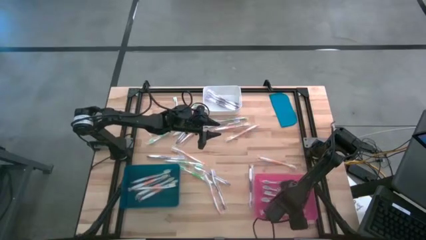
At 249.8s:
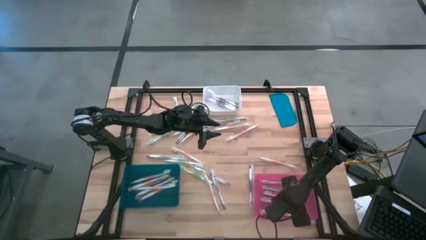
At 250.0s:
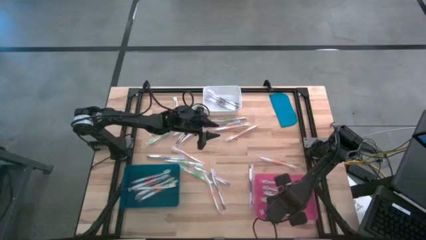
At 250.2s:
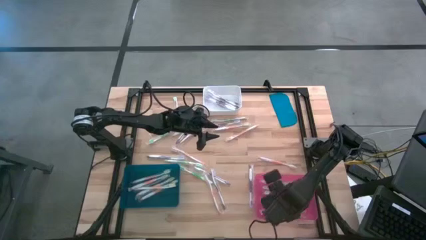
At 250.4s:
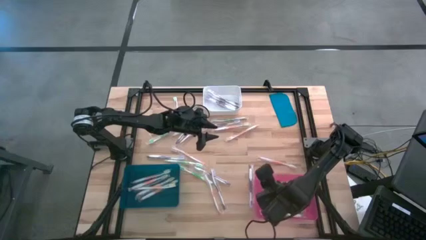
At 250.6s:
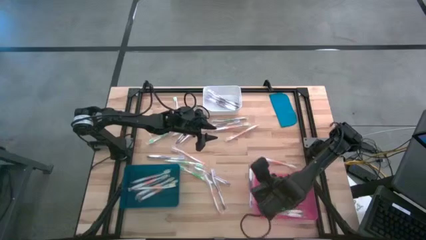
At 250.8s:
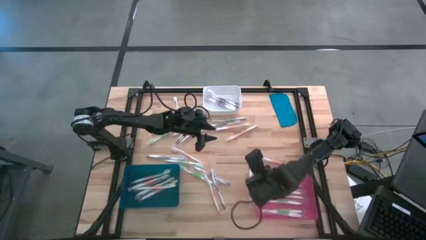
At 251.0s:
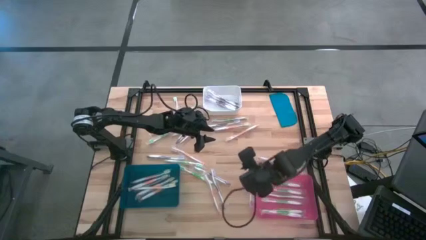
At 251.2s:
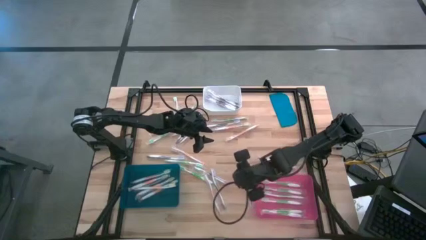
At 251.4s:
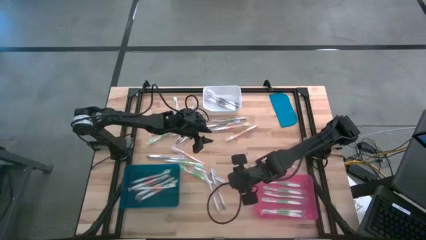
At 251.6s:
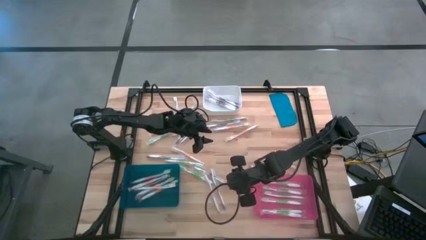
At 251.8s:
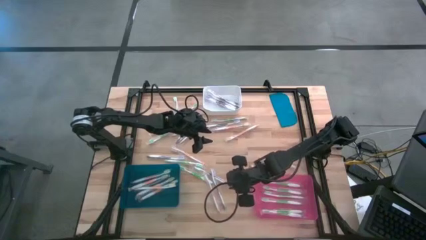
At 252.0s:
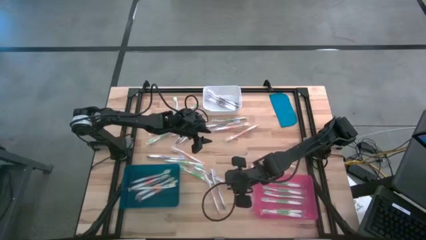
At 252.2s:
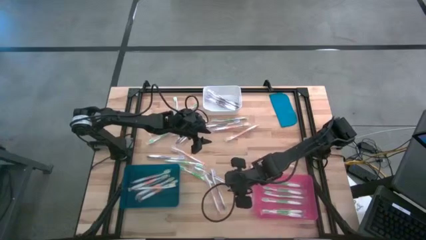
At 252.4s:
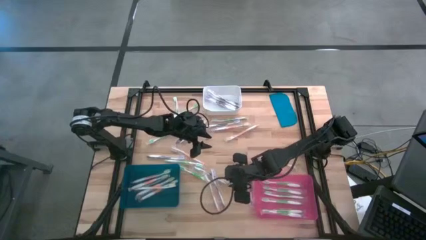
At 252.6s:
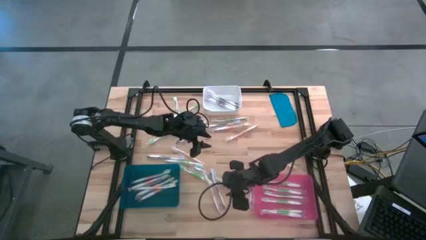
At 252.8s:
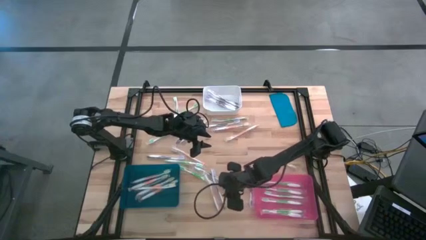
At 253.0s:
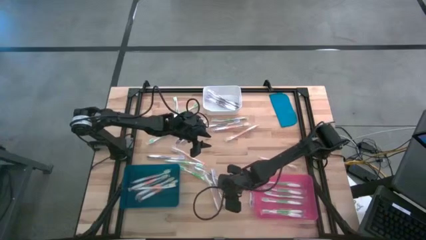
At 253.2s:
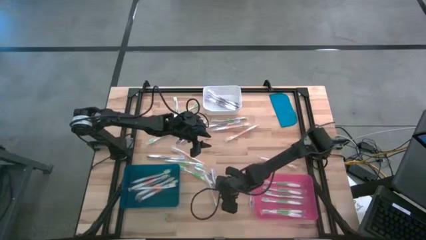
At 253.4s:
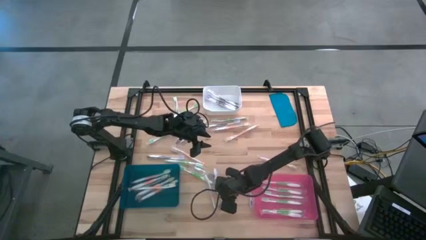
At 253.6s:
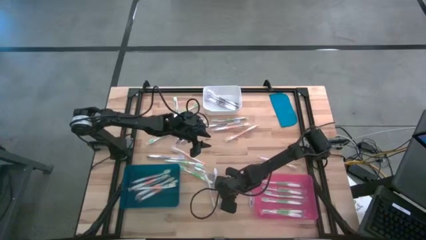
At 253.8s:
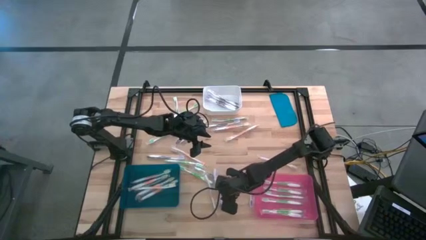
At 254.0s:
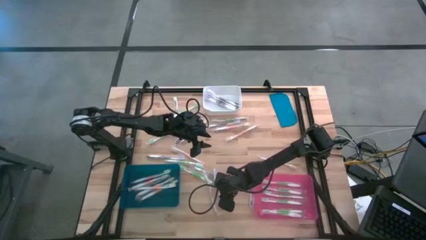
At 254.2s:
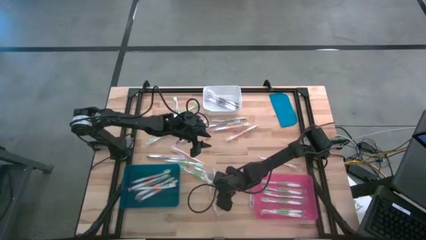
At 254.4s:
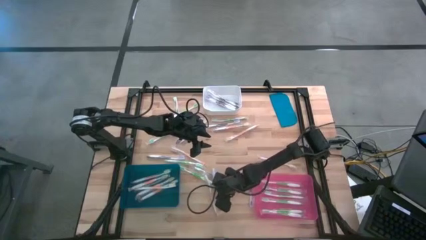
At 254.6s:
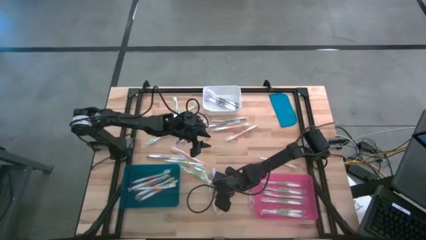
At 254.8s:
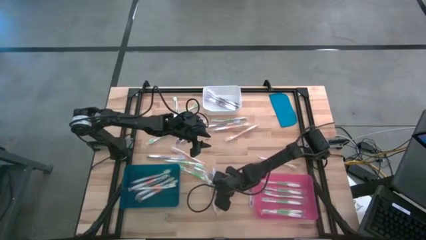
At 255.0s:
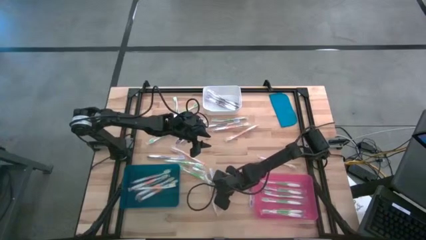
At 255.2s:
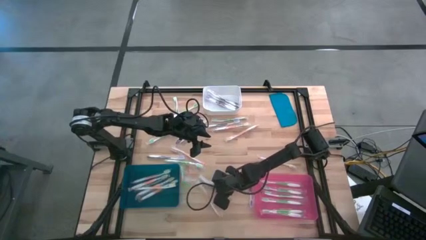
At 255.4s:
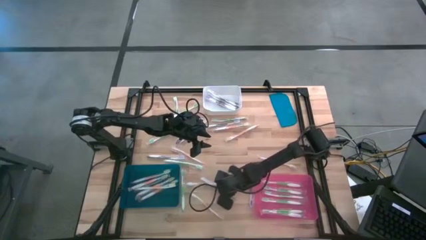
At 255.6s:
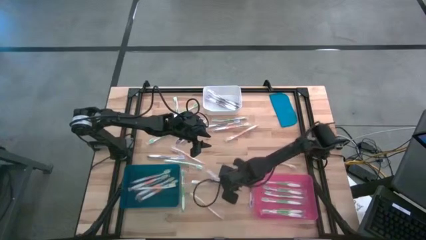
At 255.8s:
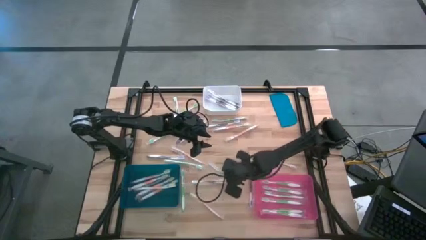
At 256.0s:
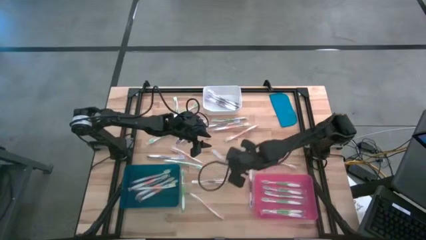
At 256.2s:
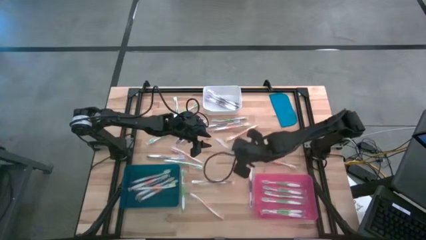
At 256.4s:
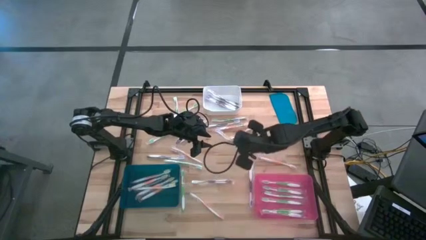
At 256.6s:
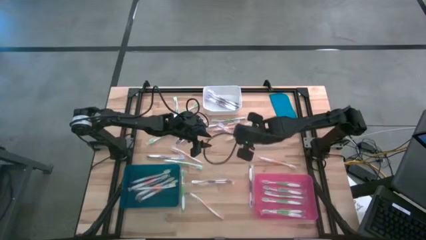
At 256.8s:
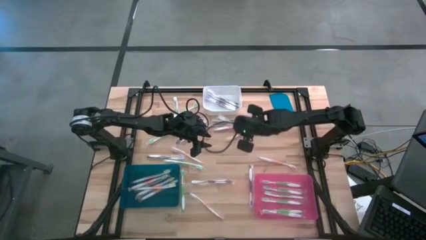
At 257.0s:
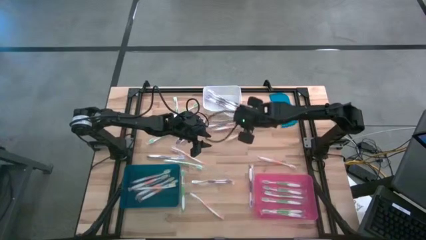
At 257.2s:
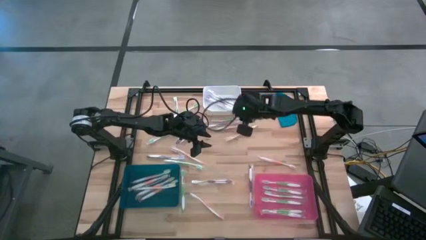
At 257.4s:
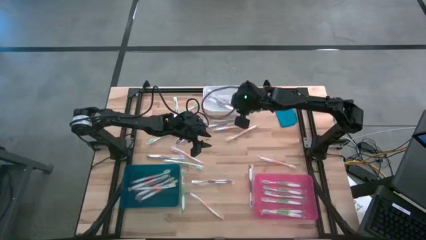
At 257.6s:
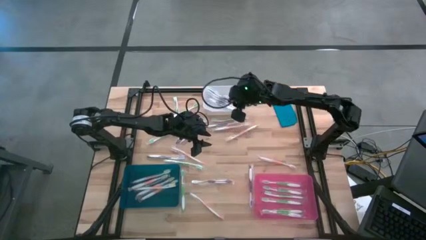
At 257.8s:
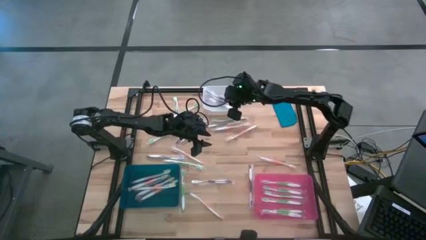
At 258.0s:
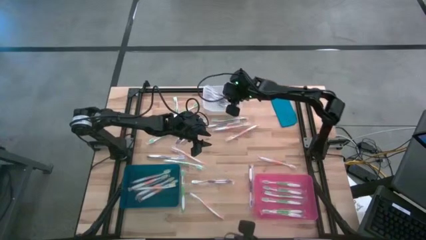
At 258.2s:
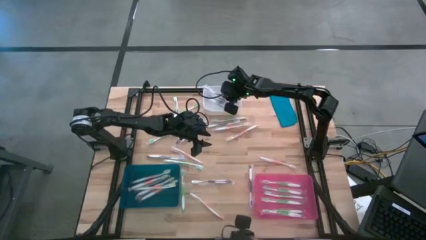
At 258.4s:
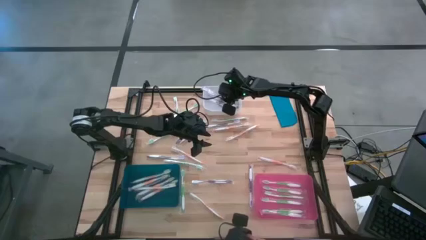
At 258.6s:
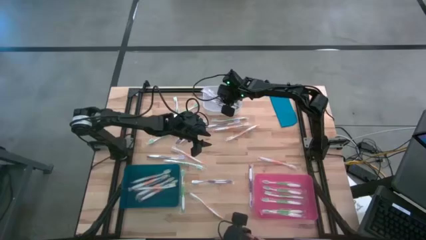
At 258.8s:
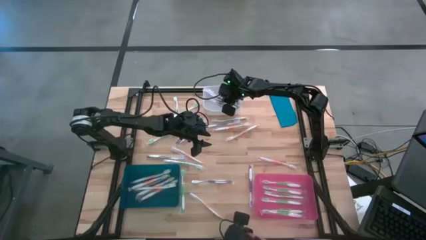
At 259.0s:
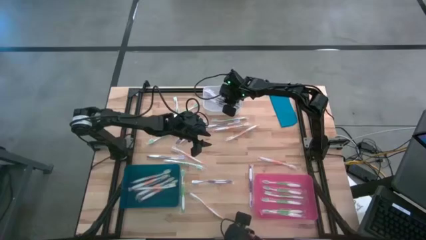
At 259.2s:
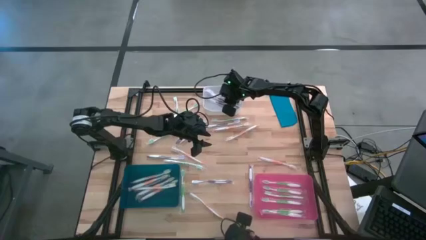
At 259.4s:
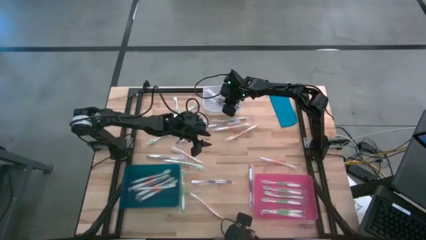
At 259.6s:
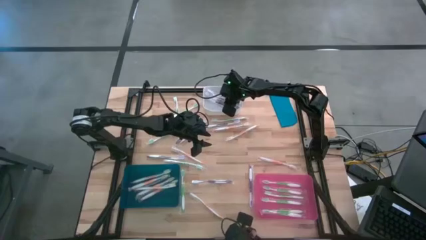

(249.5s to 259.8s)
Task: Pick & Place Toothbrushes
Put the violet toothbrush into the white bin
